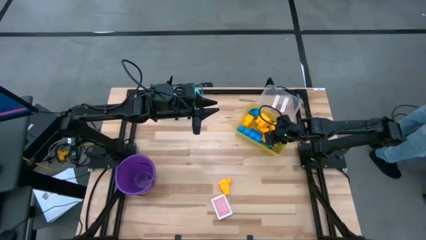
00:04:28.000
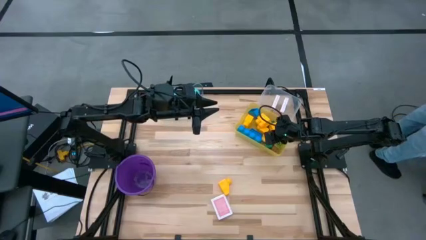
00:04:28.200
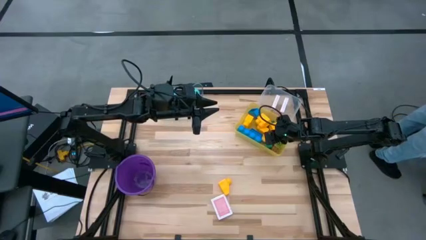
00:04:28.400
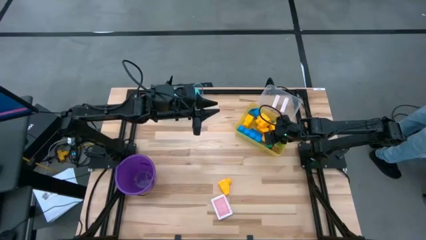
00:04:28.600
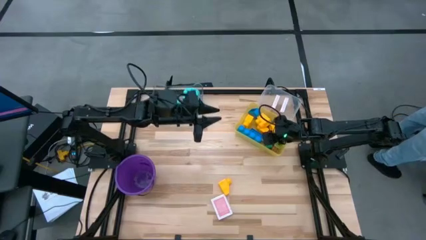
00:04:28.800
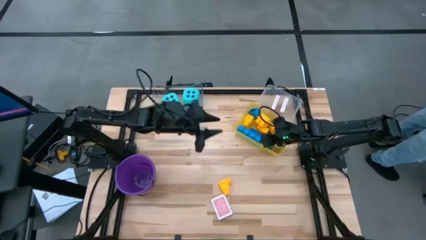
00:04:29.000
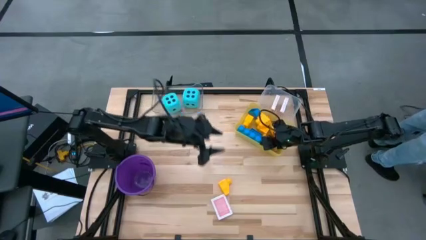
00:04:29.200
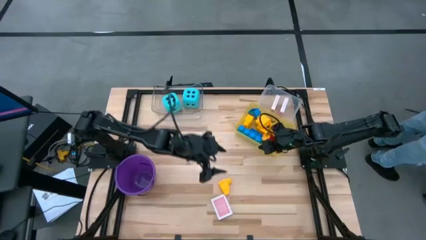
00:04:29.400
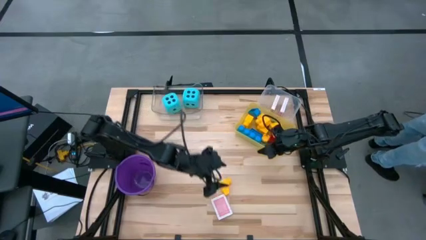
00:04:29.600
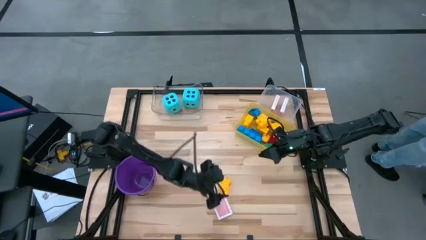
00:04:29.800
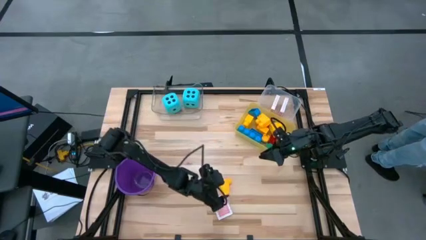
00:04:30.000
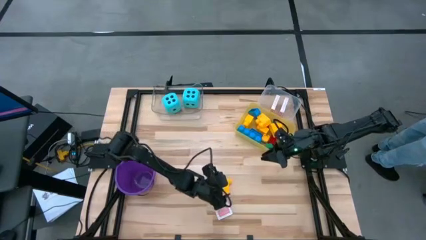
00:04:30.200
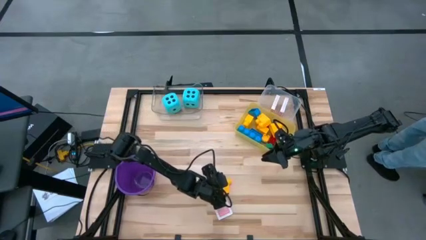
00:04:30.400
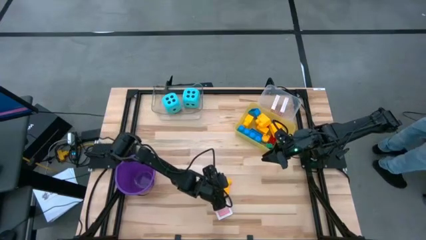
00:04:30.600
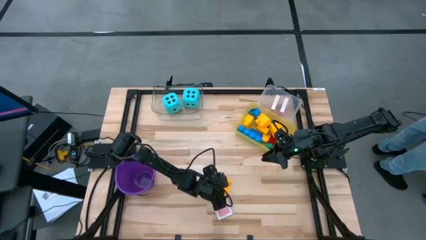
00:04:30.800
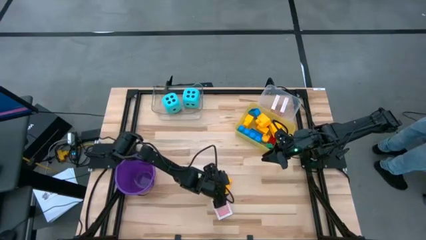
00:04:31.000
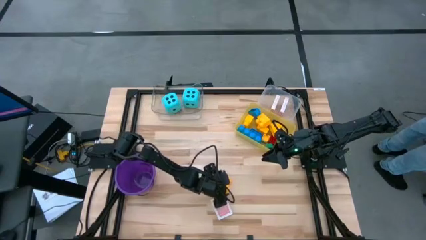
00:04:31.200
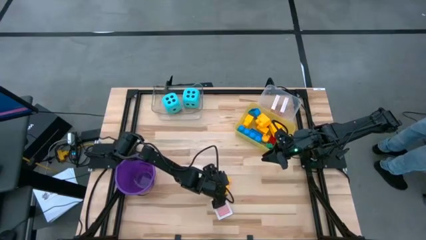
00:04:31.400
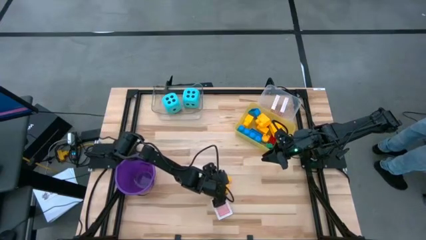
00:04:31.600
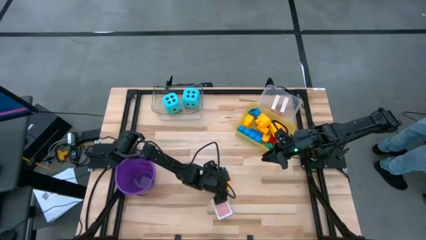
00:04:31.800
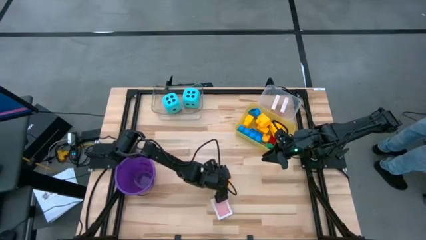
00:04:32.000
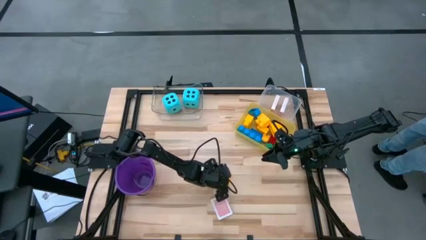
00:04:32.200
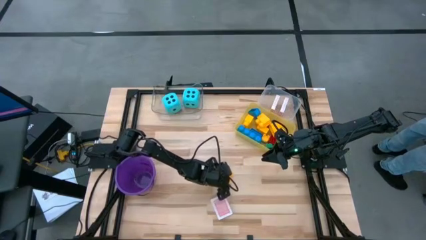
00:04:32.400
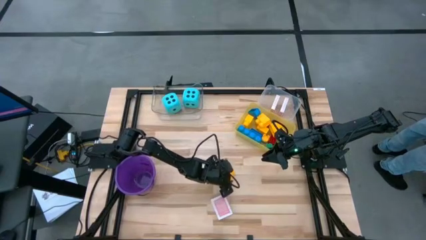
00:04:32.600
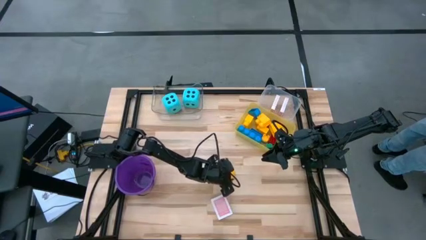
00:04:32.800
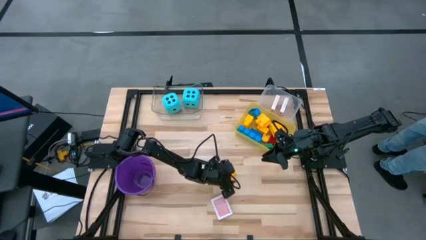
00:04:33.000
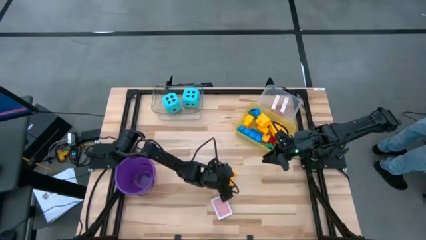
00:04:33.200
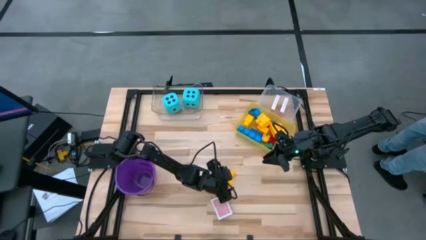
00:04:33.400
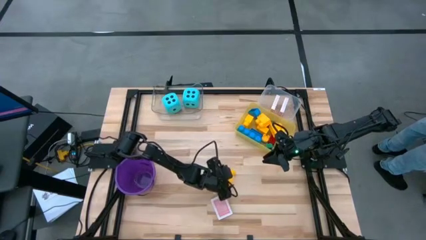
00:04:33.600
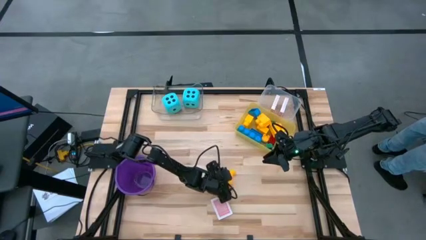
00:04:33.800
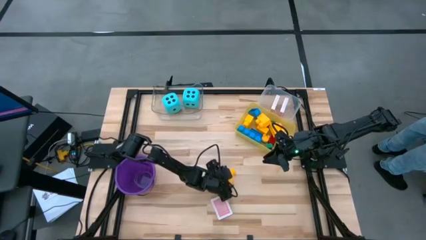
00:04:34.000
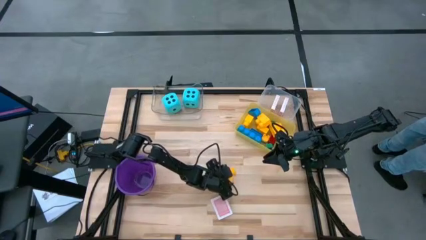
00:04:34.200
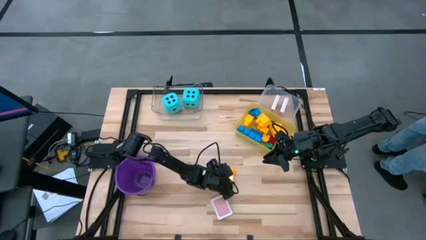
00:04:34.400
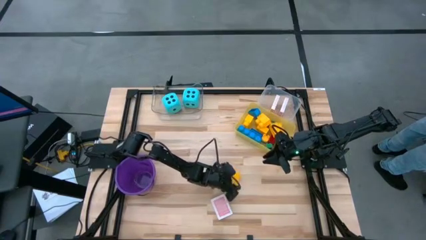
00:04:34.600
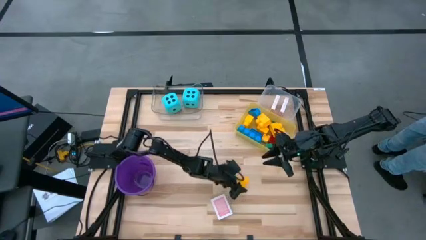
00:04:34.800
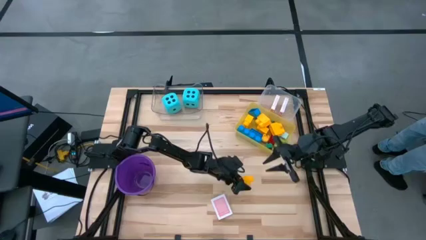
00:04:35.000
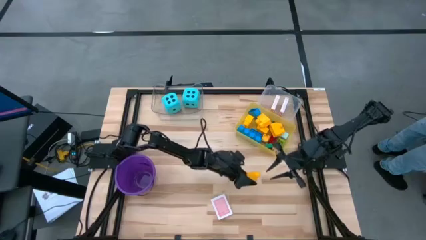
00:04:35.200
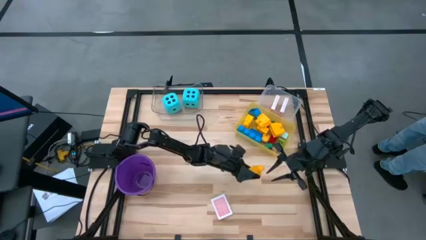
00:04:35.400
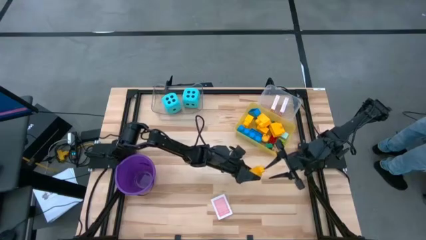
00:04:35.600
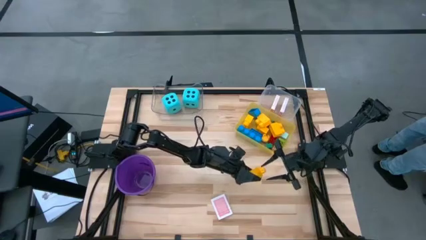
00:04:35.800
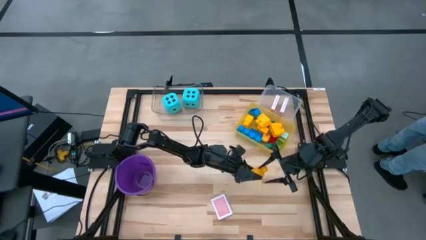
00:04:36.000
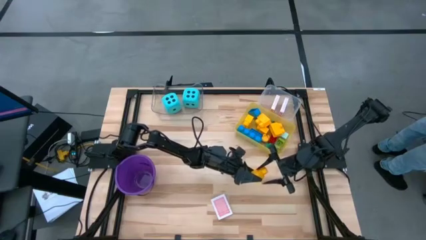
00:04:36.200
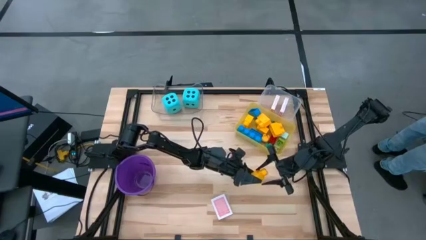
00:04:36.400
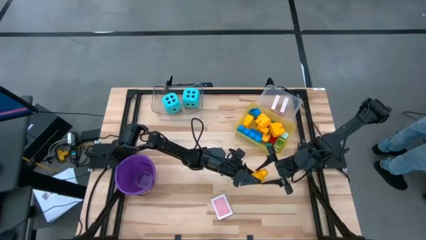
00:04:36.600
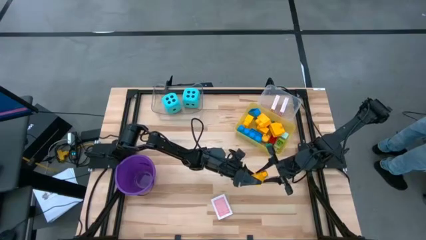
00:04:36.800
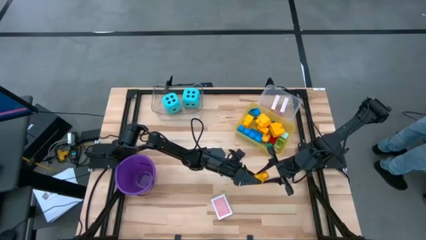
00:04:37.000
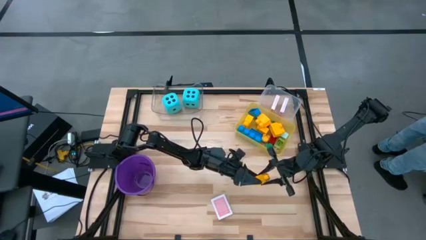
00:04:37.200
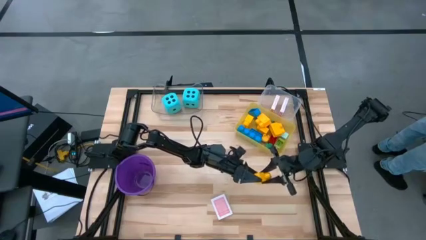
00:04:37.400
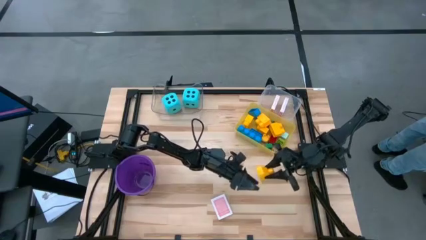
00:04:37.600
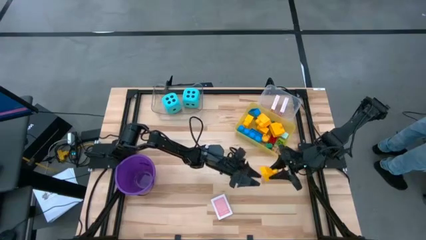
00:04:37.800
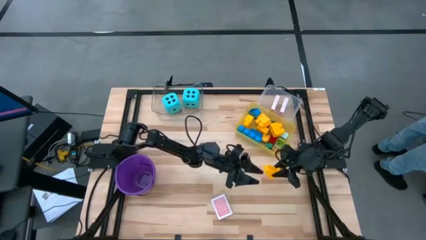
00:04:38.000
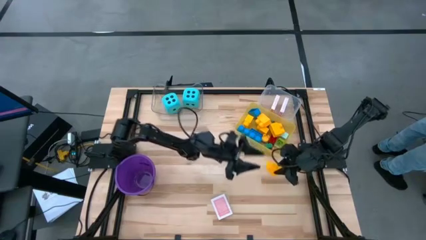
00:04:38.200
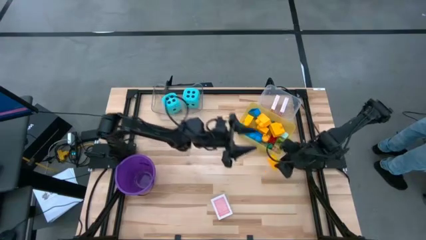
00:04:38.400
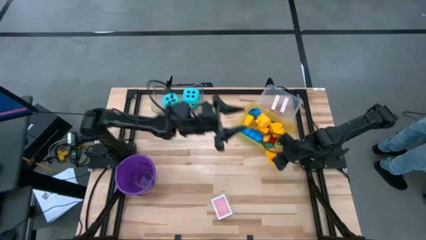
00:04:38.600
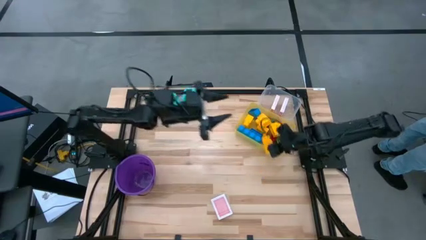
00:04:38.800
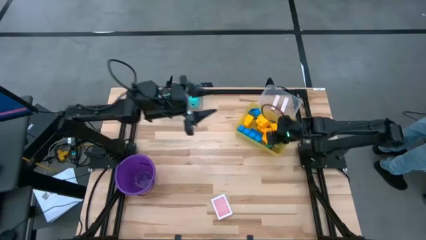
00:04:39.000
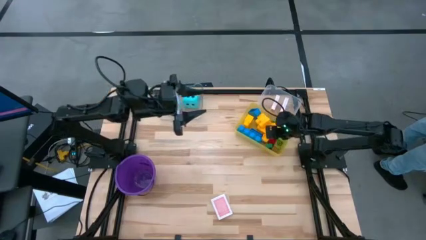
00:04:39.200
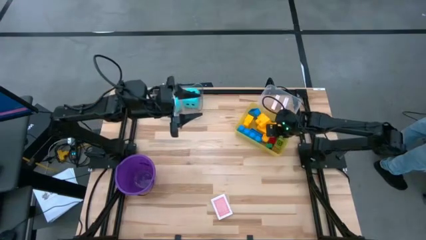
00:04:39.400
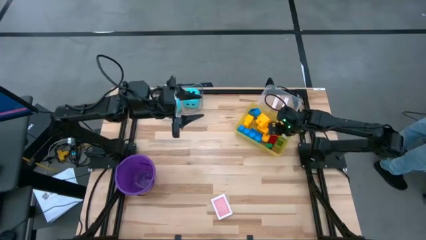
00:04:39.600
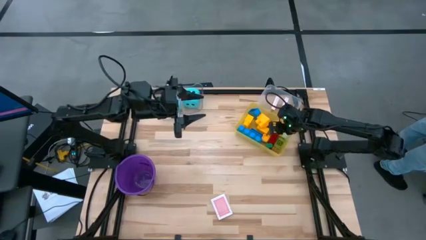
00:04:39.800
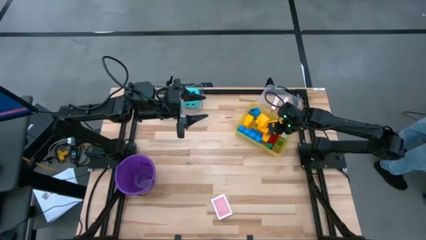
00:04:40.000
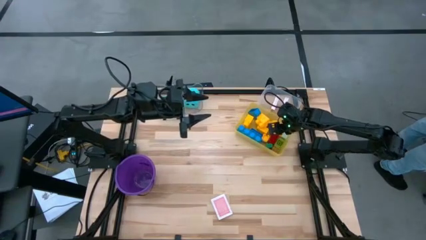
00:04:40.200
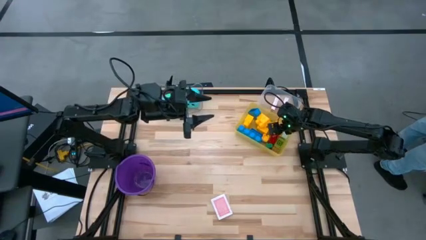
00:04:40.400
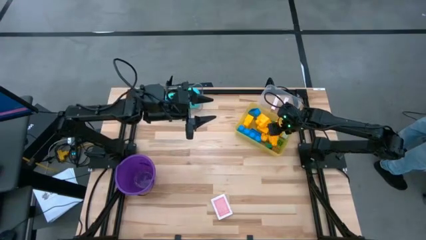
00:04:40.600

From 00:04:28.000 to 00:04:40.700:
Task: Pick & Place Toys
Put the yellow game piece into the yellow bin
